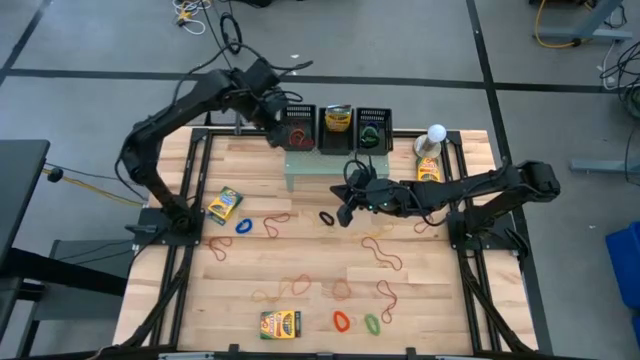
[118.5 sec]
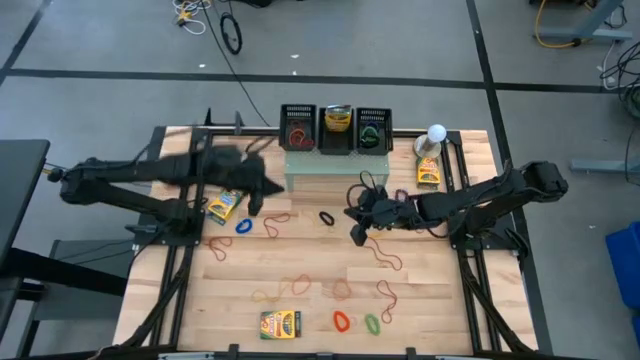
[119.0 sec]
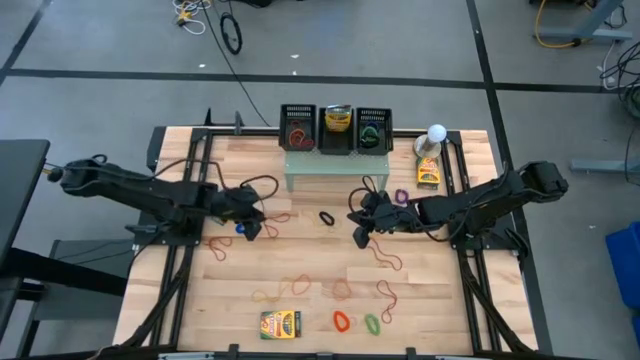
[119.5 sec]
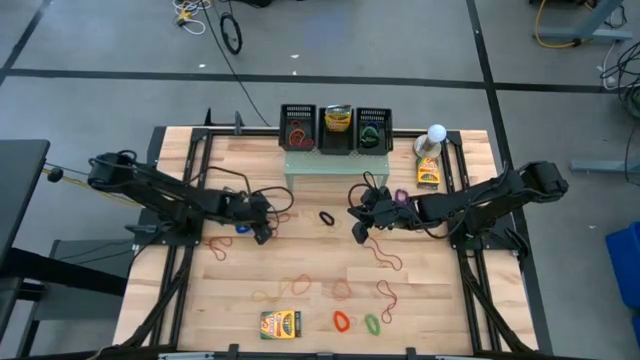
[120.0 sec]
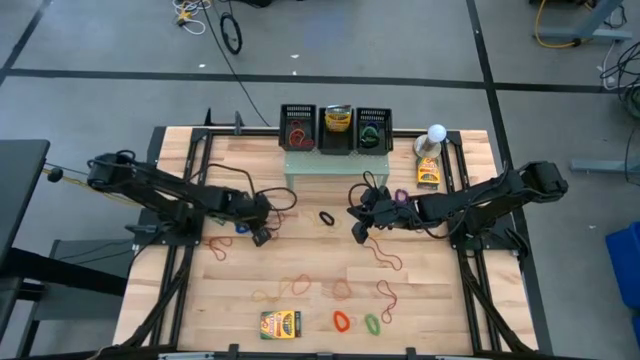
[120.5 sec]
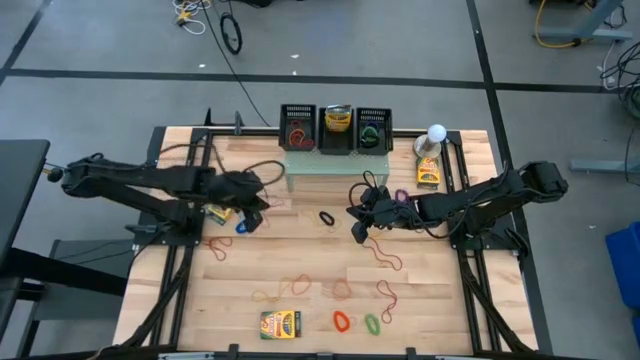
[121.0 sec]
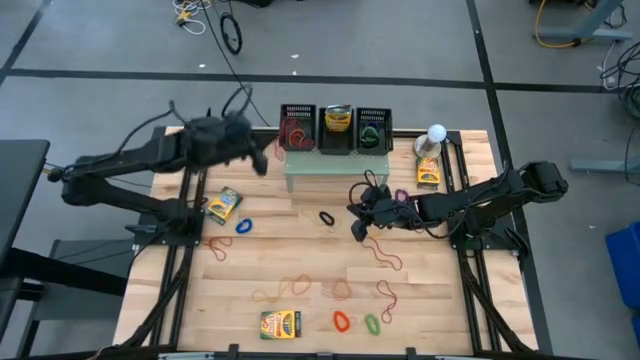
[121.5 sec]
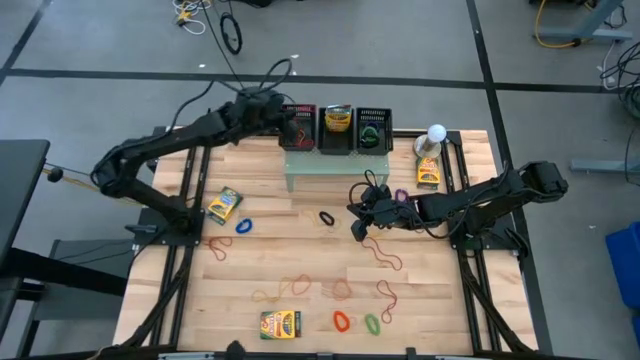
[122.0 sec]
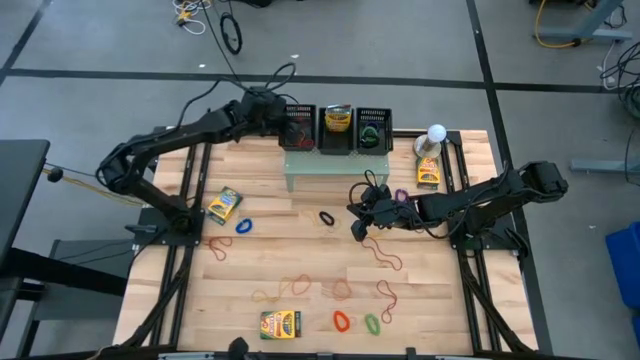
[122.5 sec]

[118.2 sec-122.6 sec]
Task: Pick & Place Office Desk Supplies
Put the red rubberband into the left black bin on the shelf

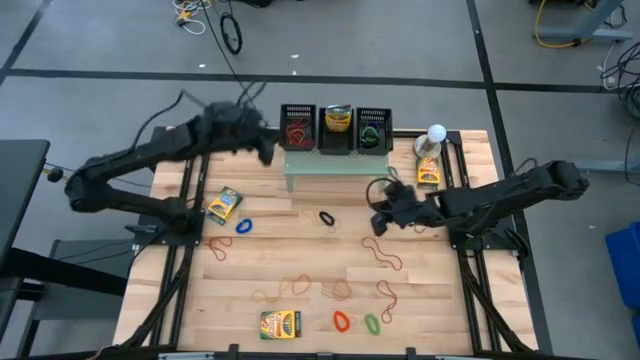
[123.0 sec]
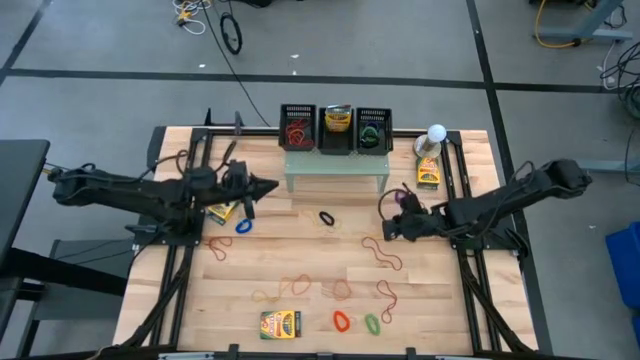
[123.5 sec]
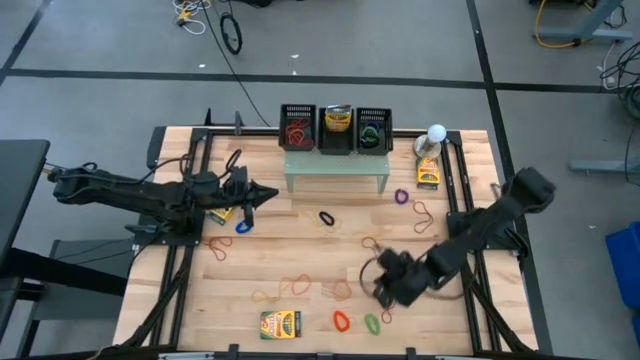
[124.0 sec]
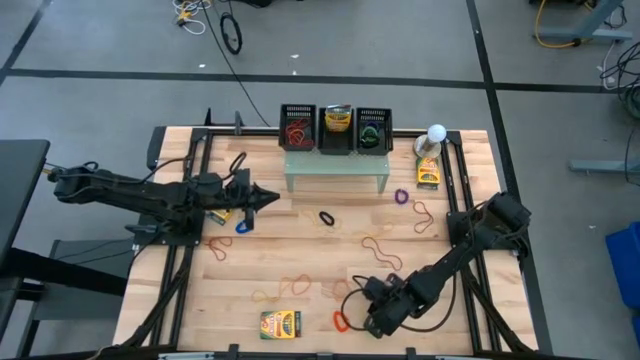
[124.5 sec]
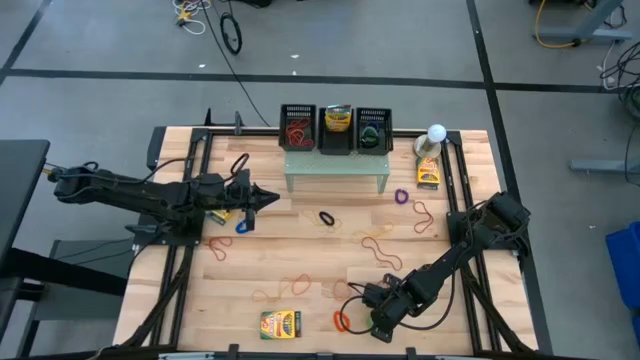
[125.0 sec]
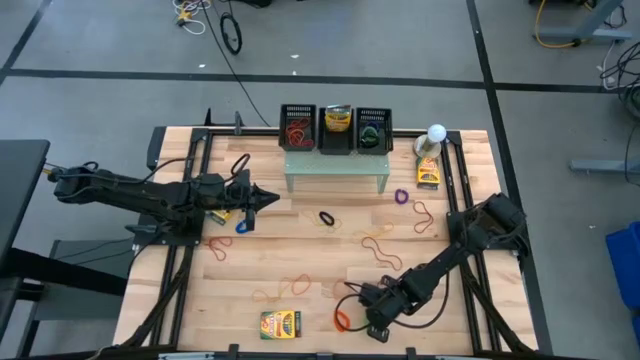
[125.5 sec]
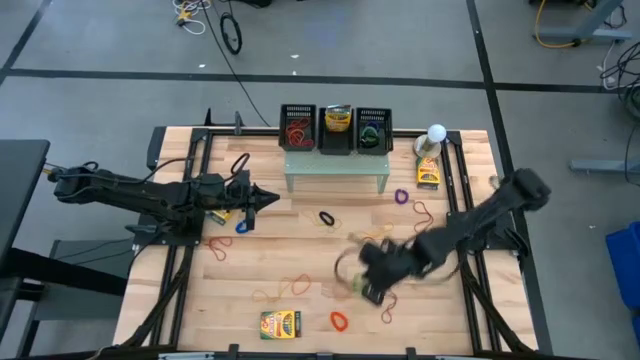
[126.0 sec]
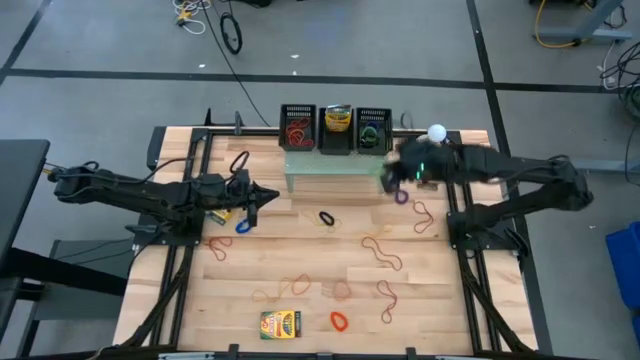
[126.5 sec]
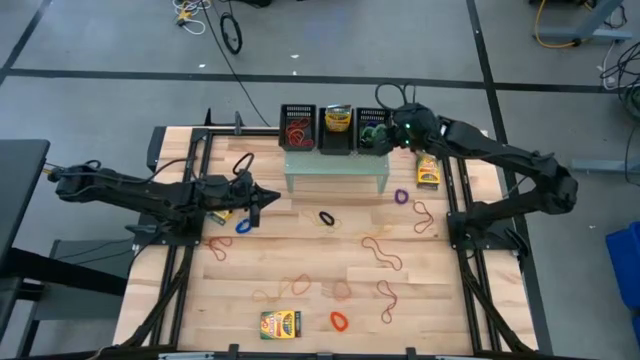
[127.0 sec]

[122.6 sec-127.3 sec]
Put the green spring bracelet into the right black bin on the shelf

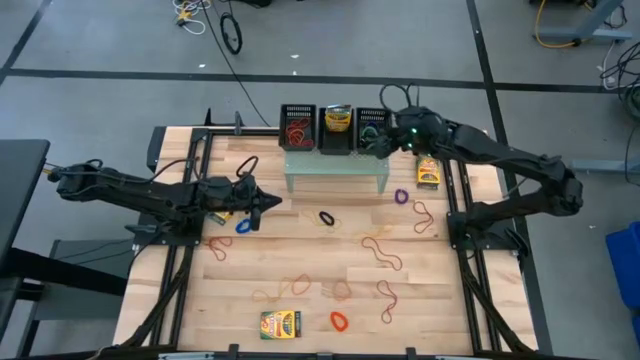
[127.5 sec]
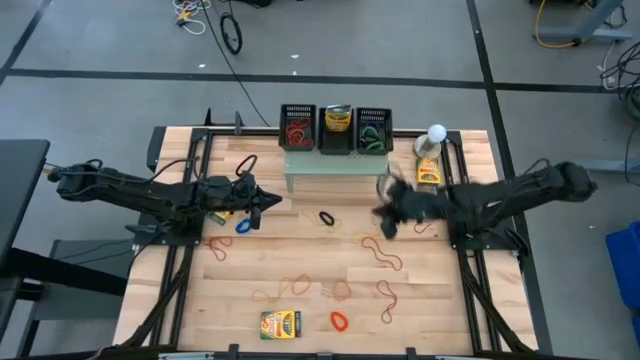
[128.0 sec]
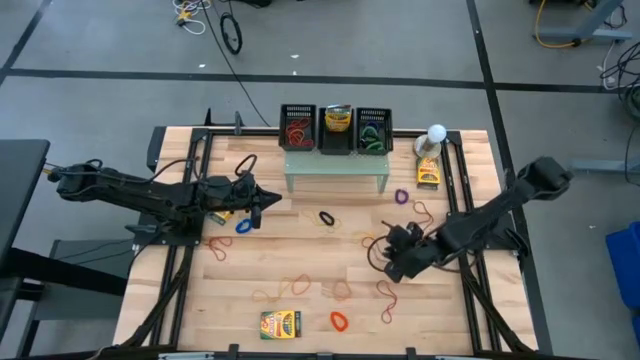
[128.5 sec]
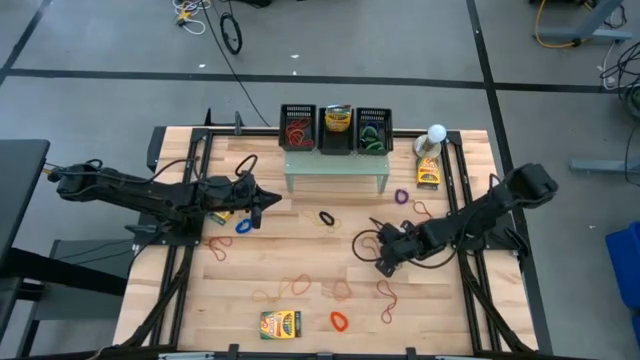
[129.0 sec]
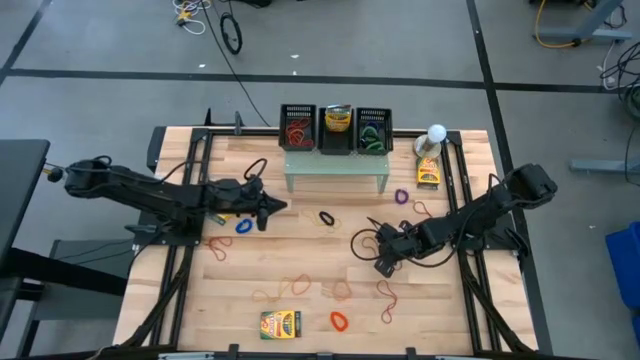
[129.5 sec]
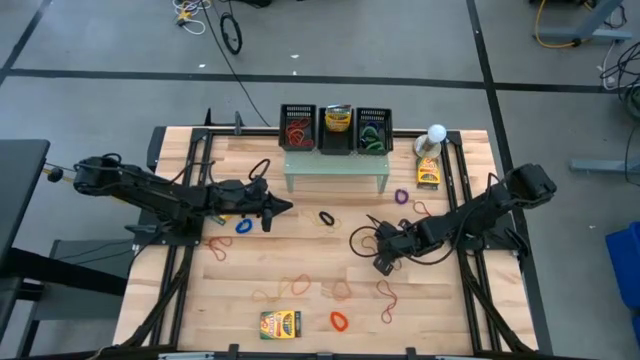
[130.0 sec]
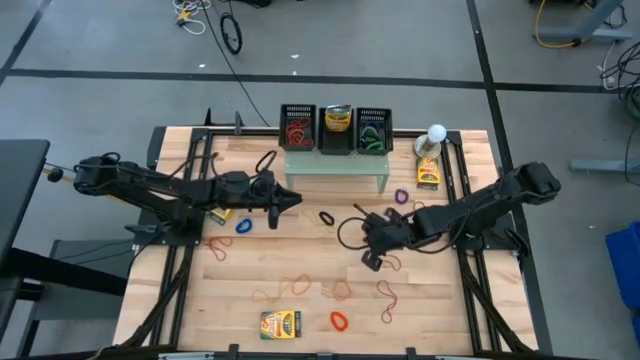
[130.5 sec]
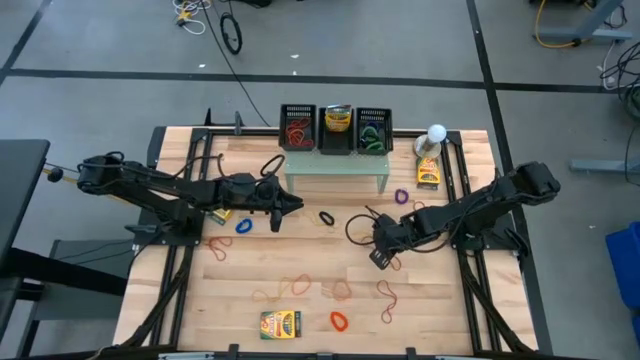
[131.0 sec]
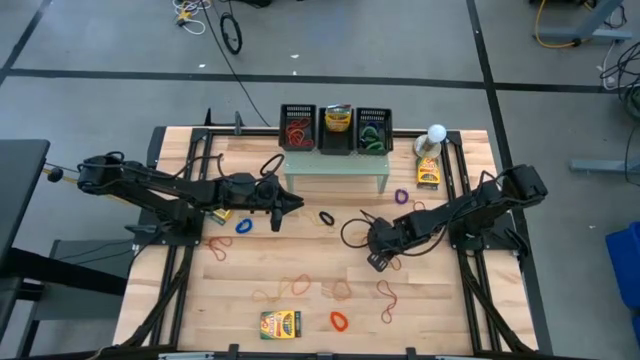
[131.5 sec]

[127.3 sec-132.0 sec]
Put the red rubber band into the left black bin on the shelf

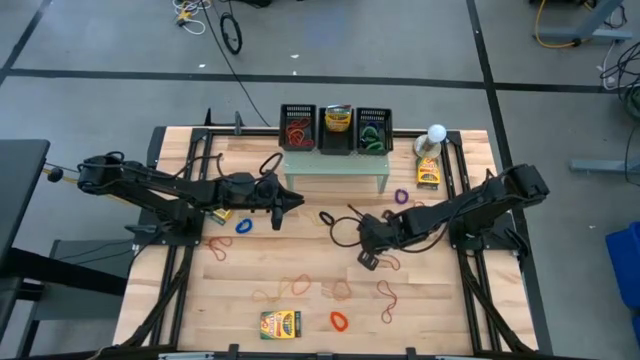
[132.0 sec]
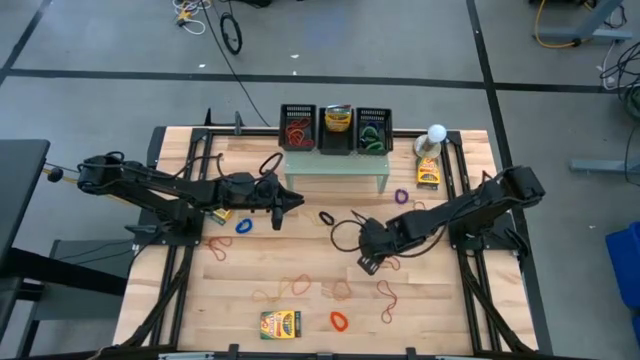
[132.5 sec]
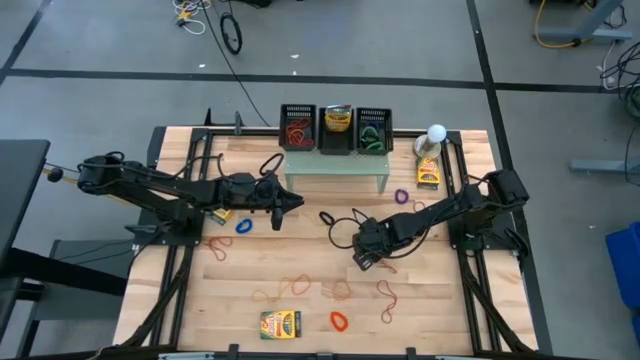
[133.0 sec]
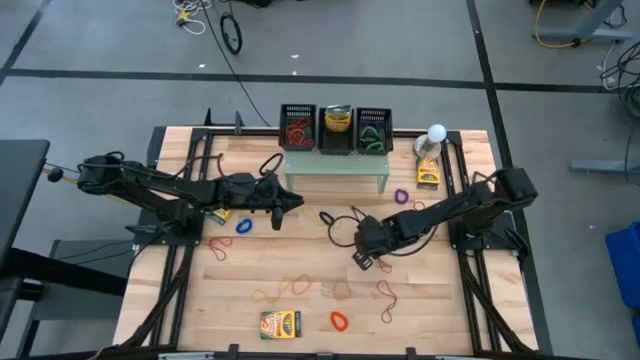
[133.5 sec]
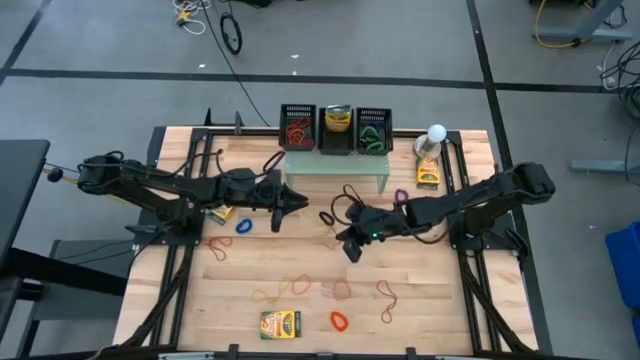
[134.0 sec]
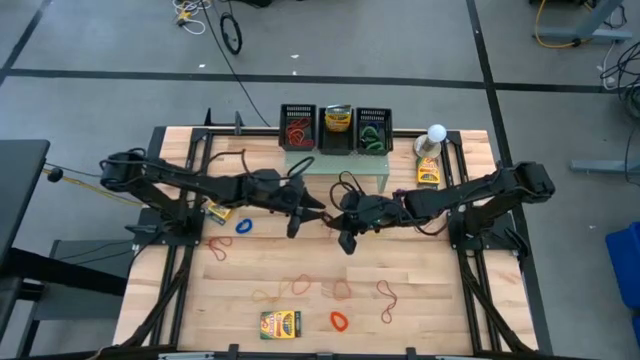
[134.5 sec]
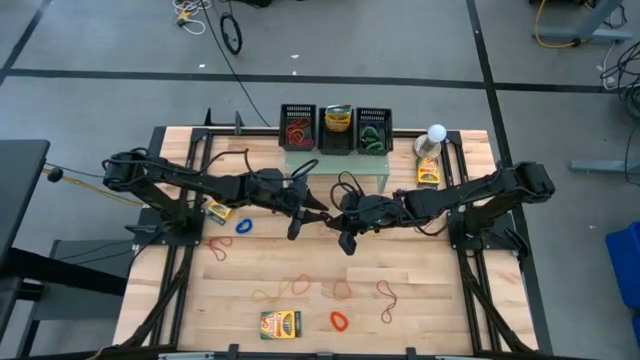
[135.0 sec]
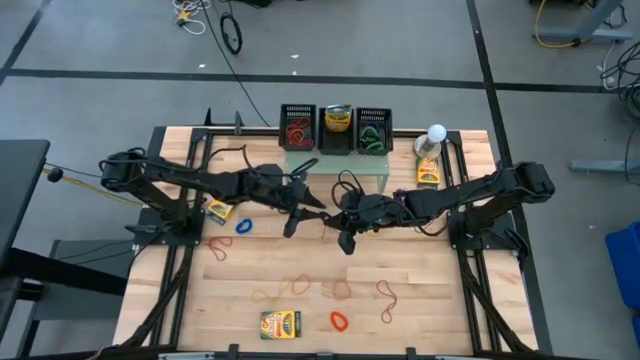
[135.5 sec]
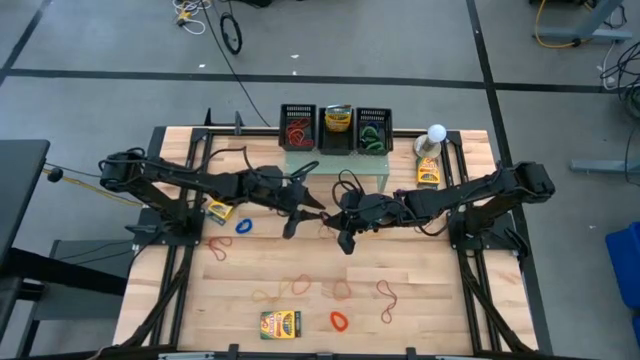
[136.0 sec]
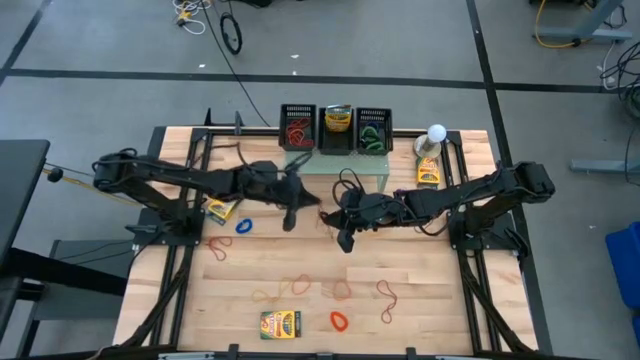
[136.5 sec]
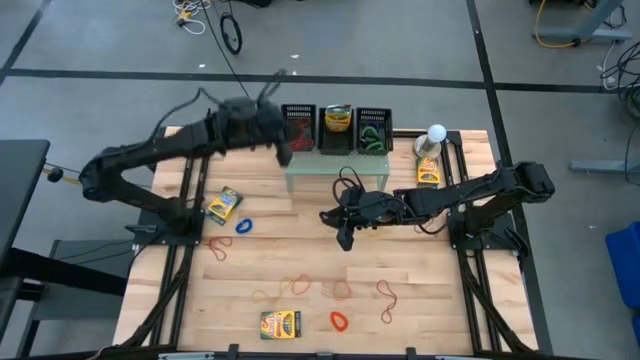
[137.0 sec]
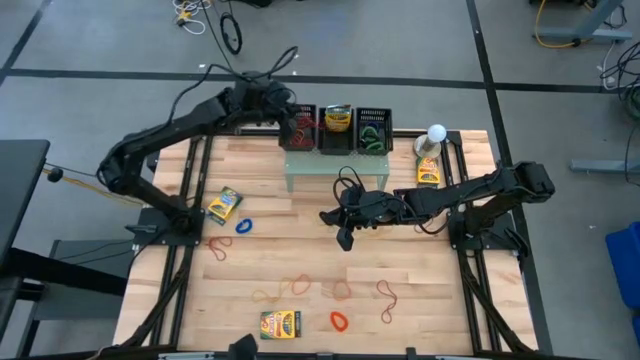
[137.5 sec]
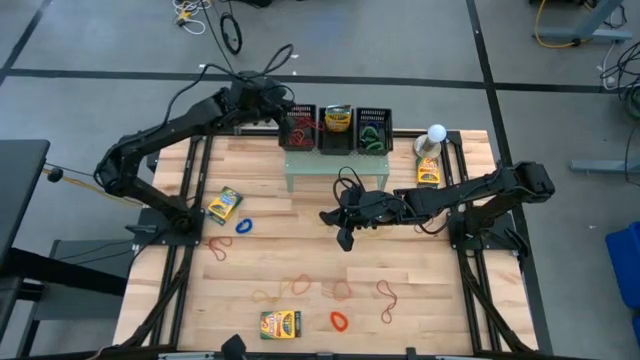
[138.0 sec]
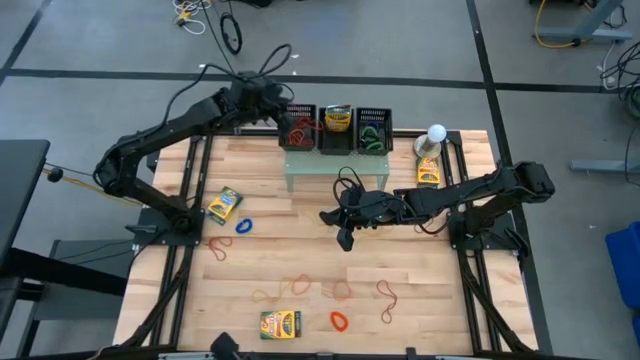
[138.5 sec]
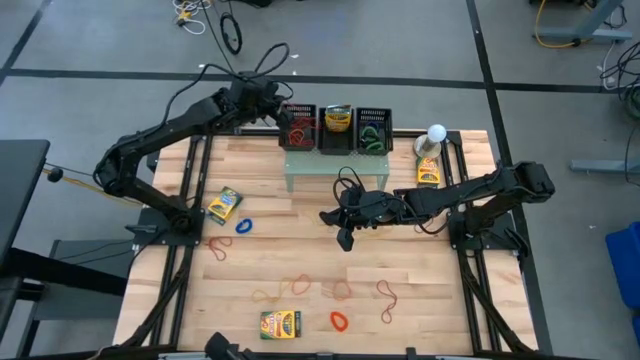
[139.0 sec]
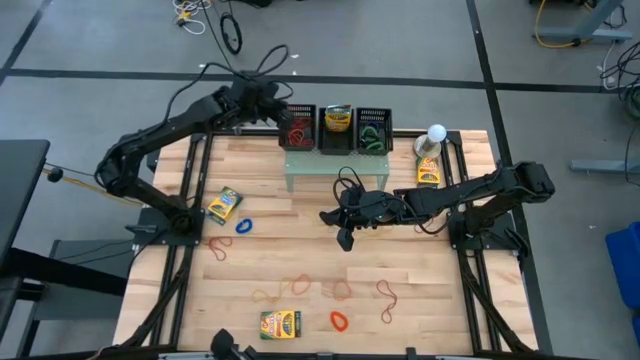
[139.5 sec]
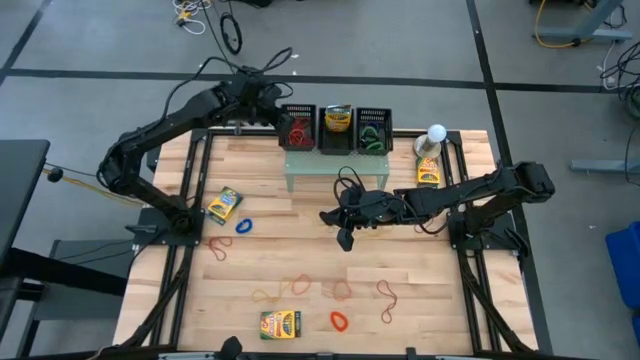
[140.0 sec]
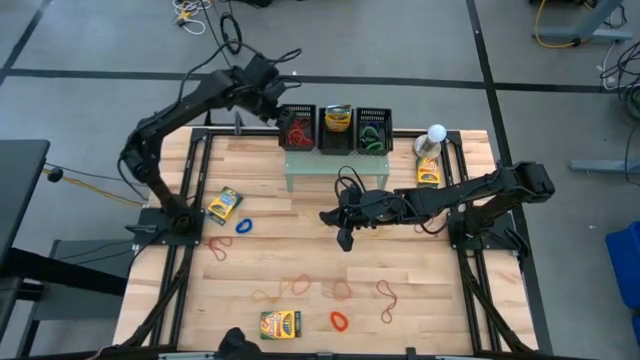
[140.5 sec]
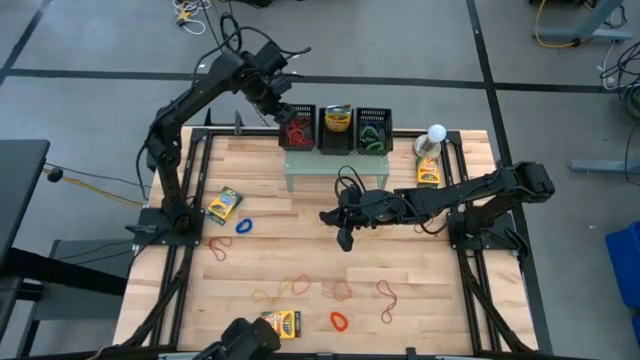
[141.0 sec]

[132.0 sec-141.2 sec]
Put the red rubber band into the left black bin on the shelf
